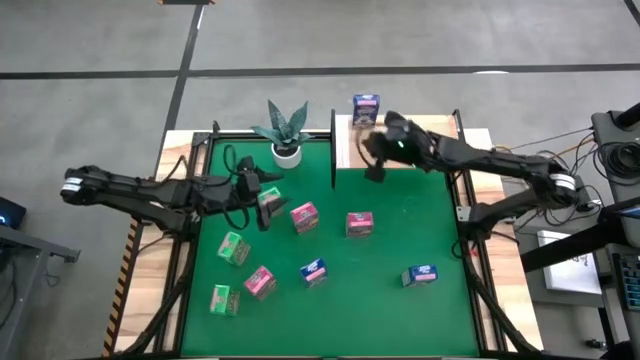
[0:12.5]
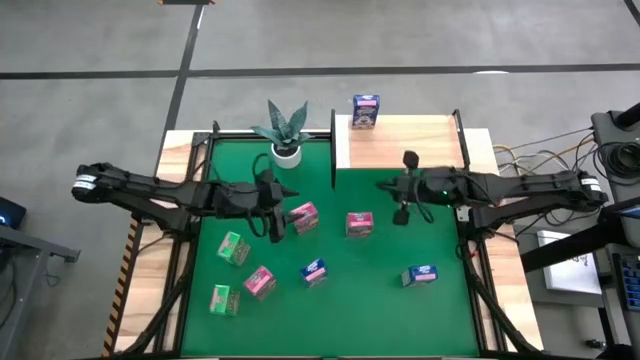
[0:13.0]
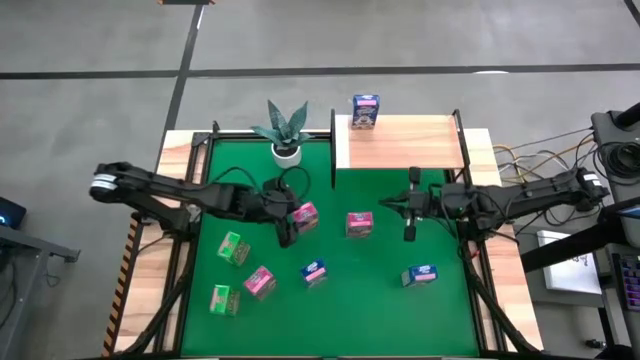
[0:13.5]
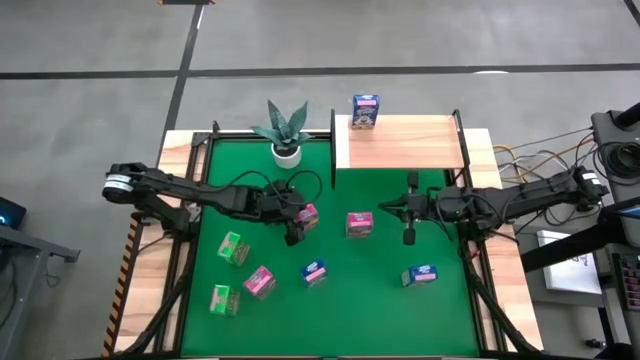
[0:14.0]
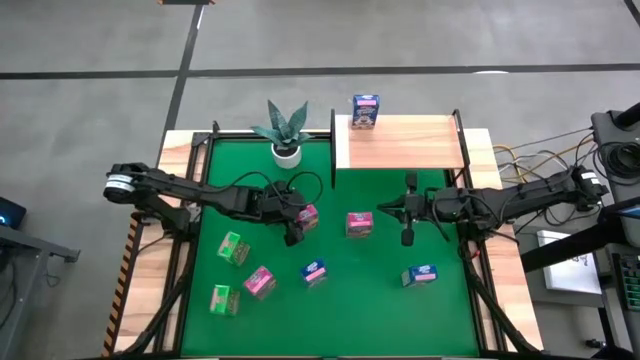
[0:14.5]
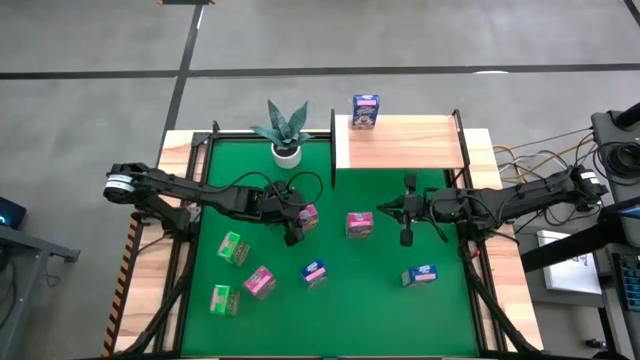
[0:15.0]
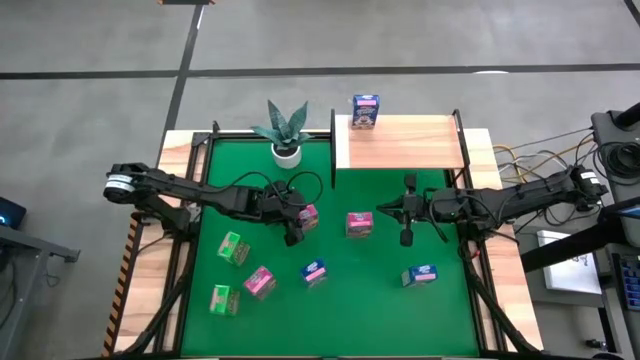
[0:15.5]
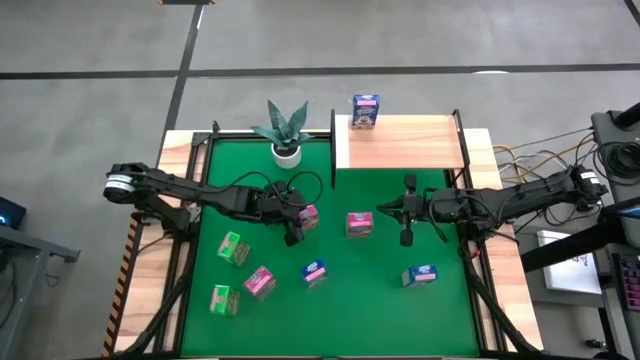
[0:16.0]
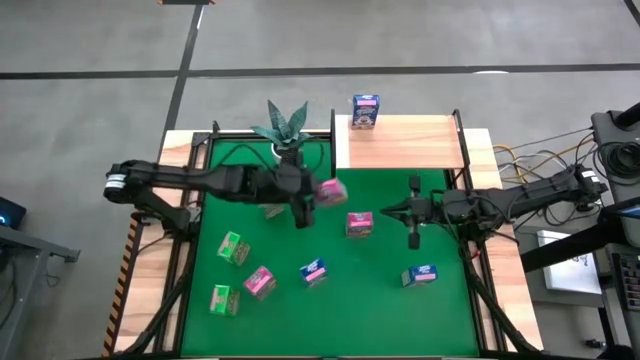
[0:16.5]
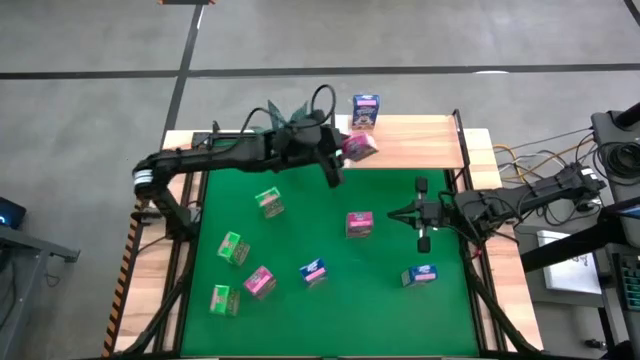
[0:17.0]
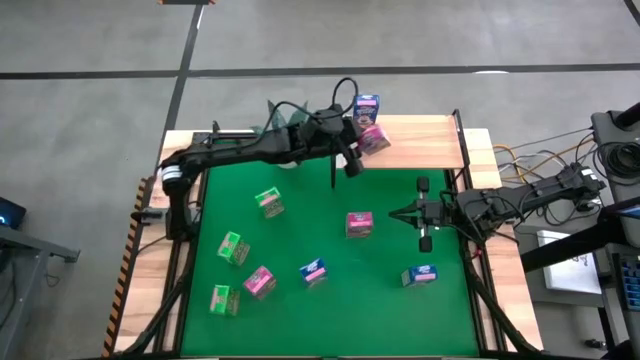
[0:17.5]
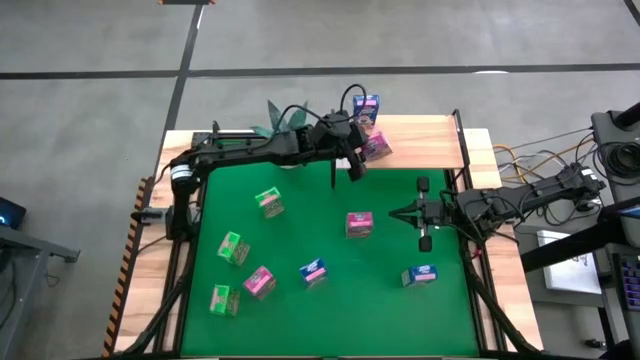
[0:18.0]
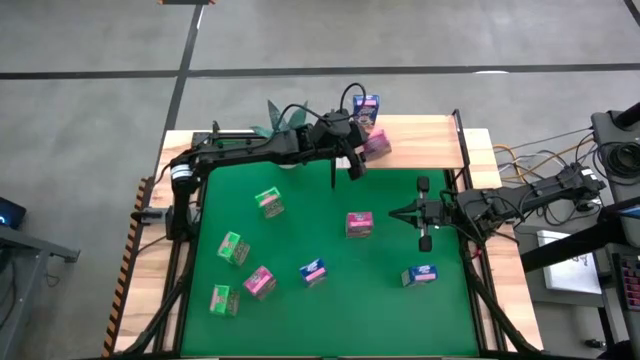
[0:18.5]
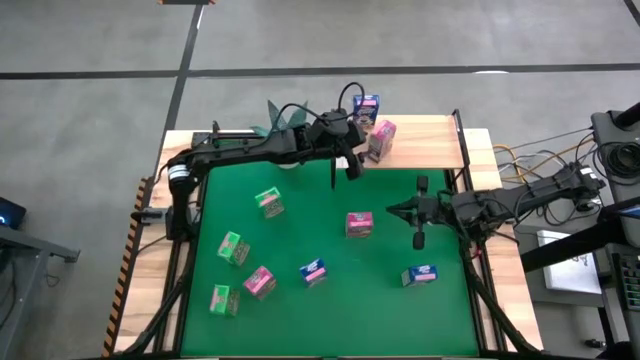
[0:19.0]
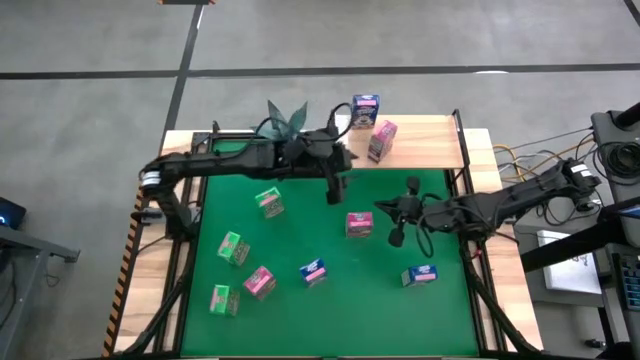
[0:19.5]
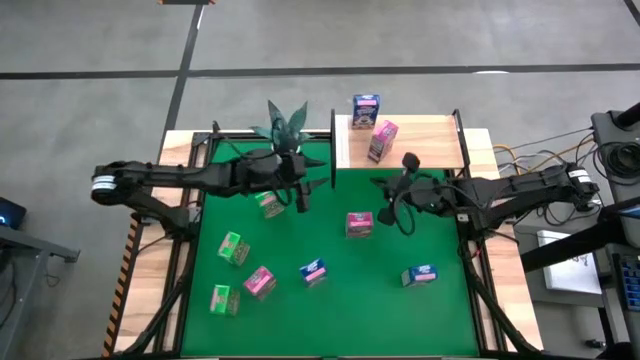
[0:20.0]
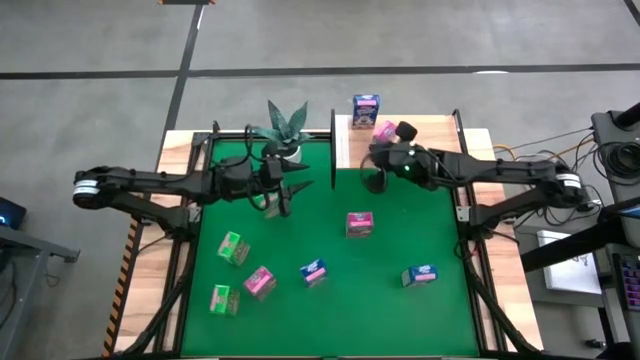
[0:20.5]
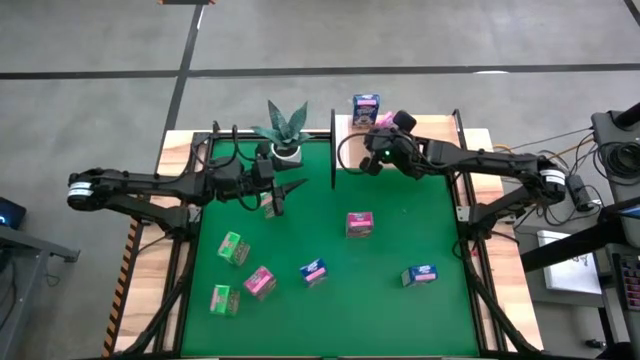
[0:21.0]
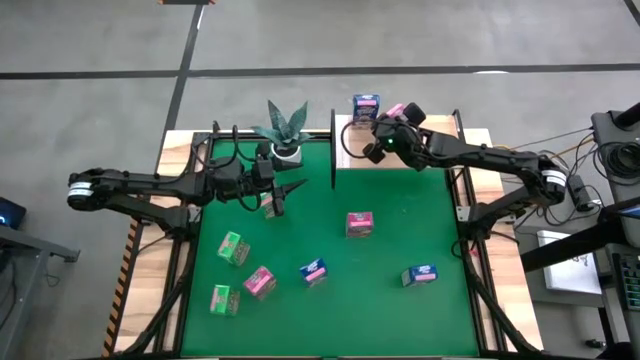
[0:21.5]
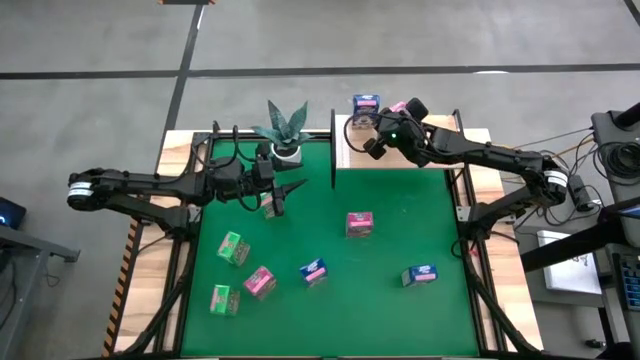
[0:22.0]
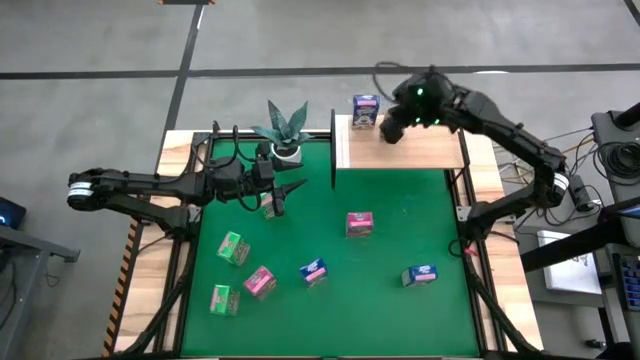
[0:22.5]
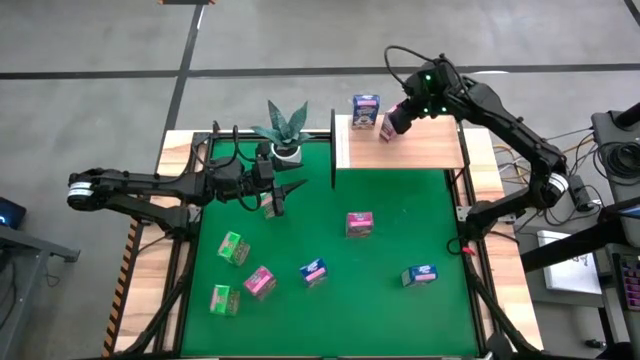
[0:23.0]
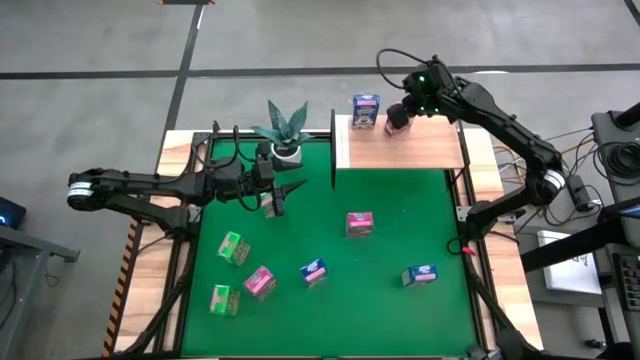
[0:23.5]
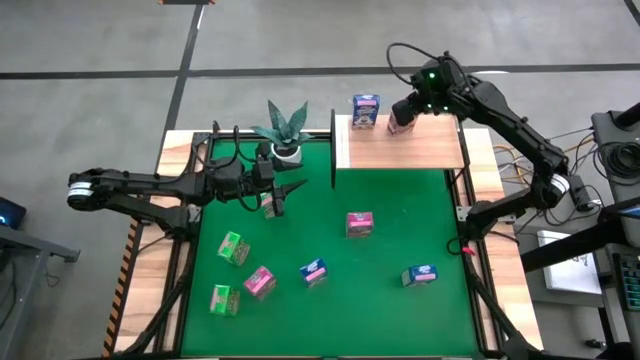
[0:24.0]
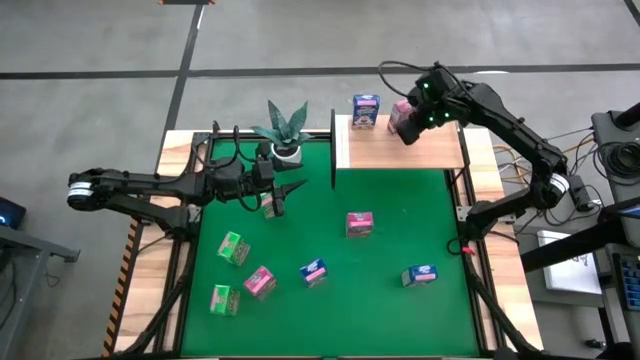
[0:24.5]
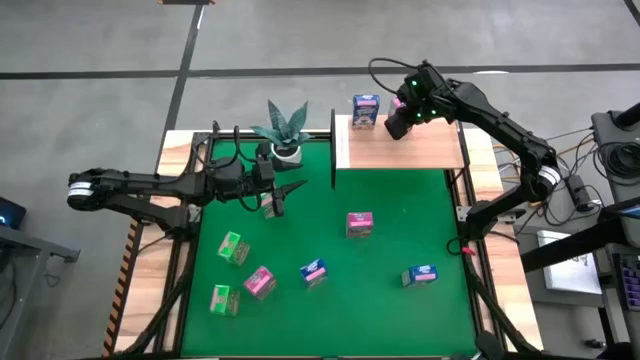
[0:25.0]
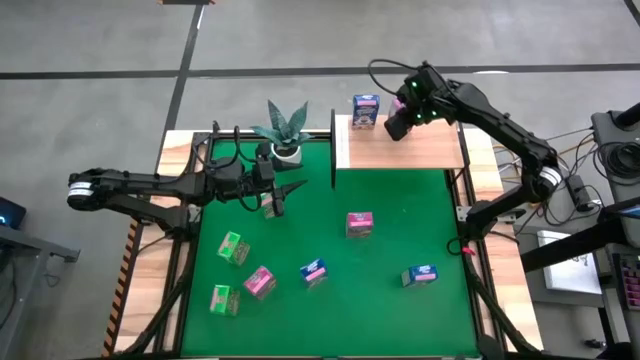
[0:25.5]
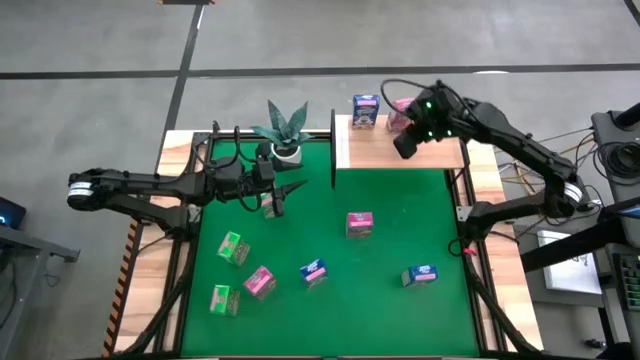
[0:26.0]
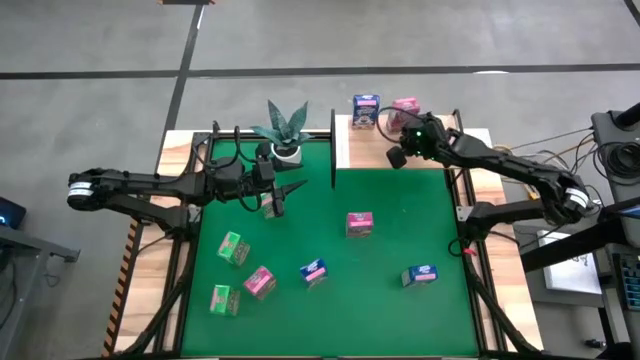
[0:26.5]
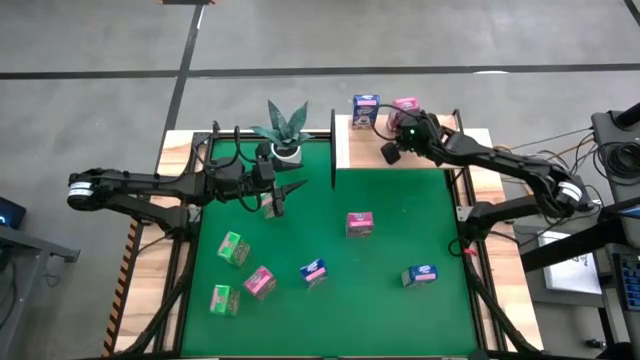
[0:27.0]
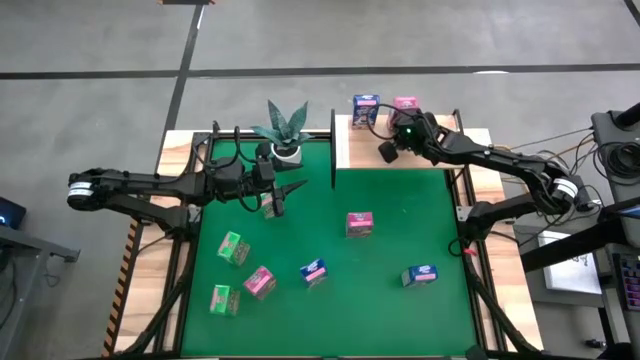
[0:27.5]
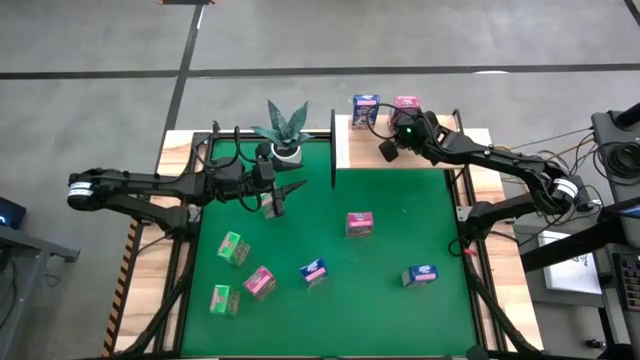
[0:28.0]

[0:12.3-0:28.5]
Task: Stack cereal on shelf
Put the top left pink cereal box on the shelf

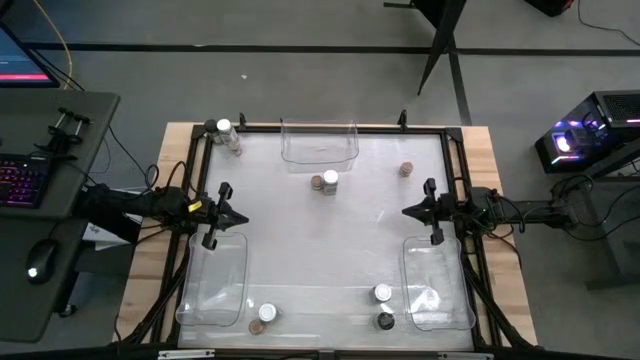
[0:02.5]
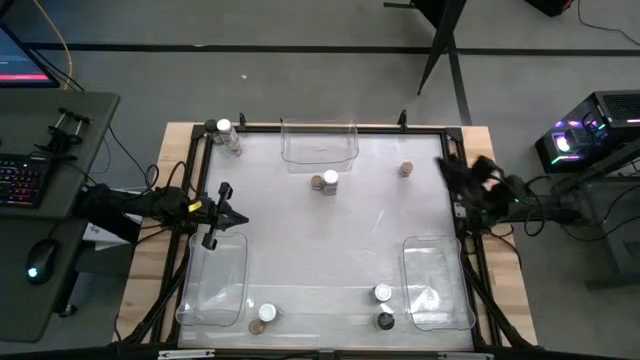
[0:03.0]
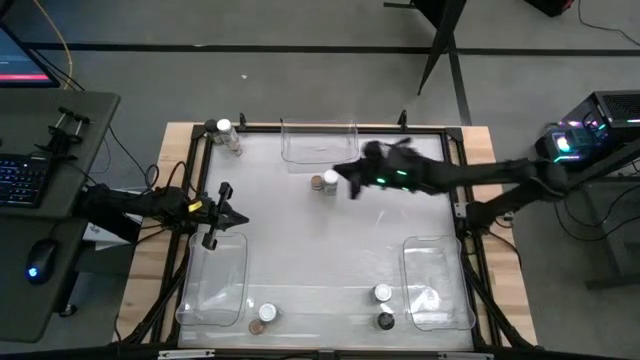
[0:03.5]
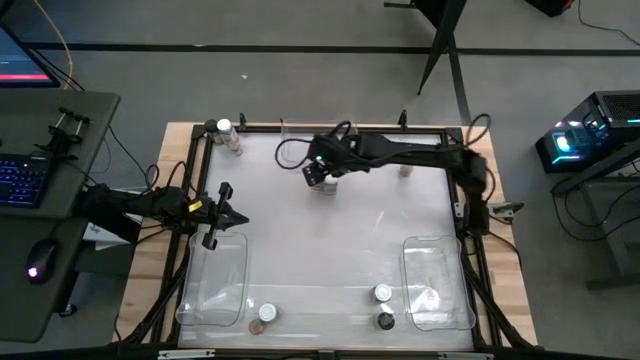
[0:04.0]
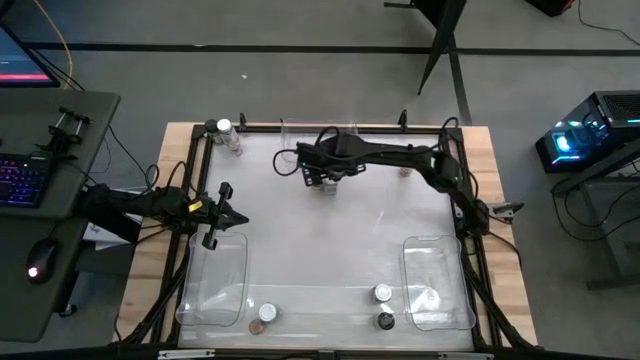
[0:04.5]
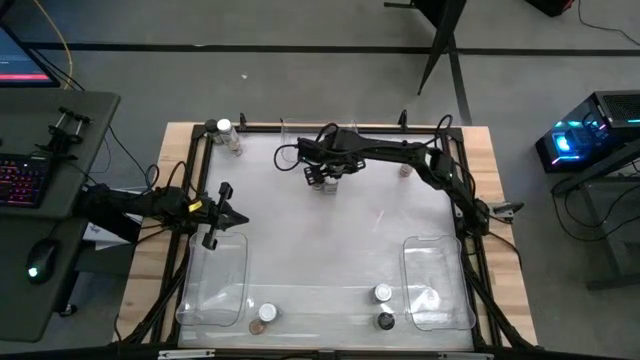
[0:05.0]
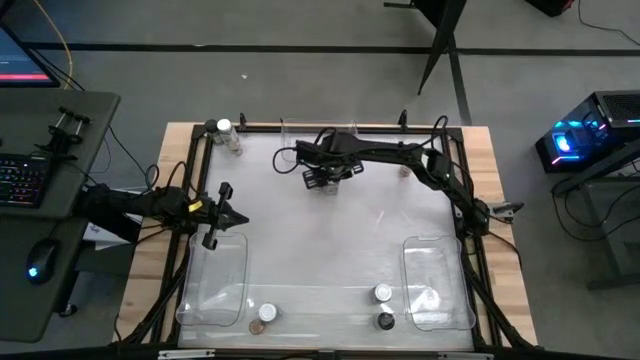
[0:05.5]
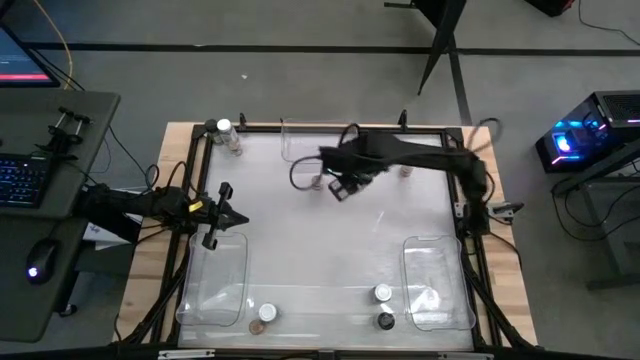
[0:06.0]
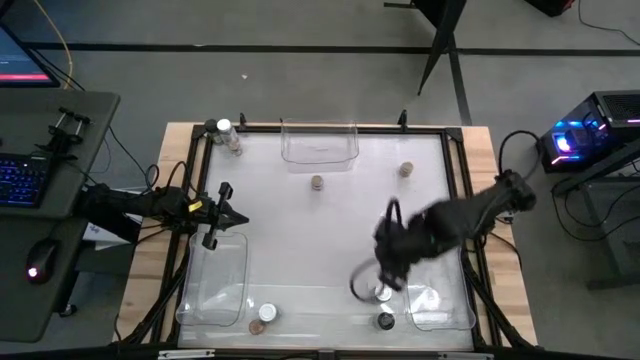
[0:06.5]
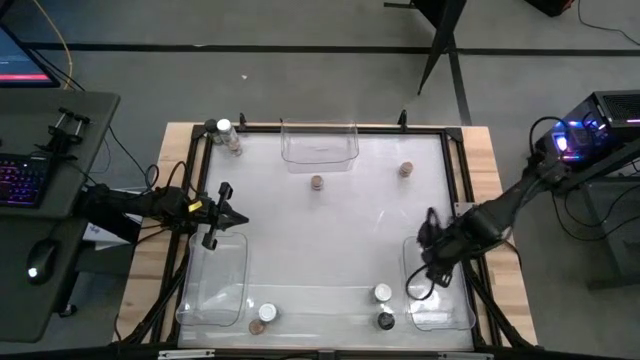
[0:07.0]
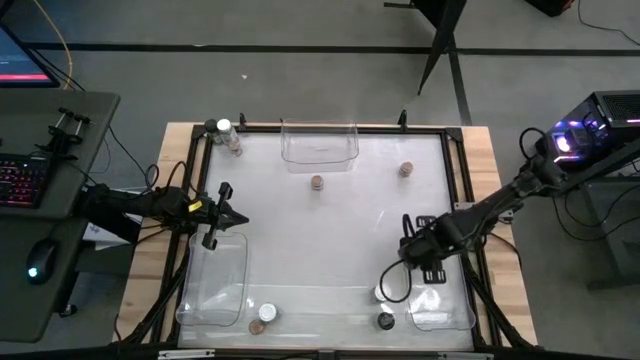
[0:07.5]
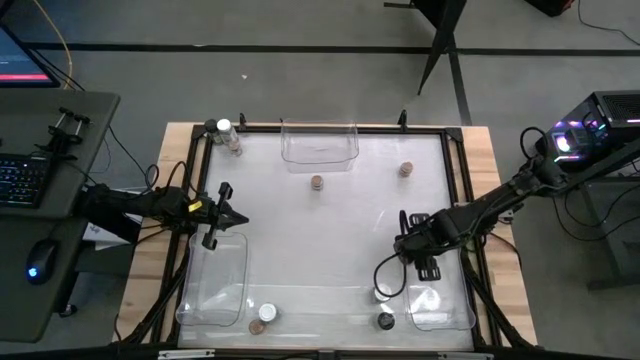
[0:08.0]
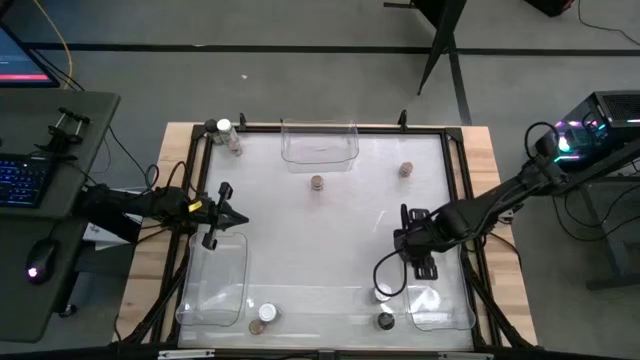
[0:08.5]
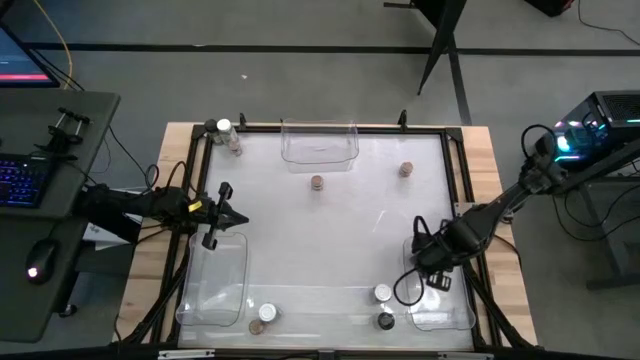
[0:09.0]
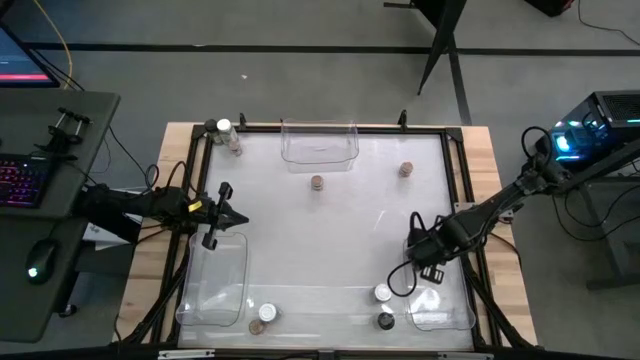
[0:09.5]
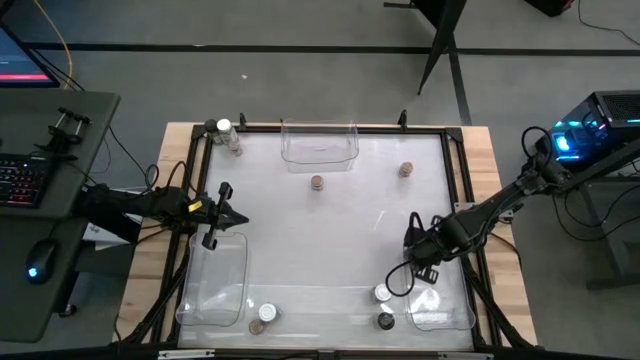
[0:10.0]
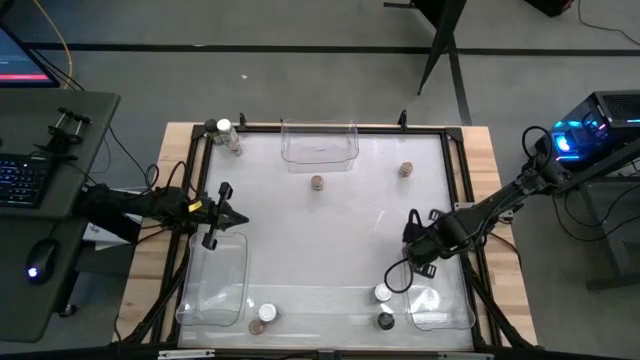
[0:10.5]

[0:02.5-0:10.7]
Task: Sort spices by type
Put the white seasoning bottle into the bottom right transparent bin
